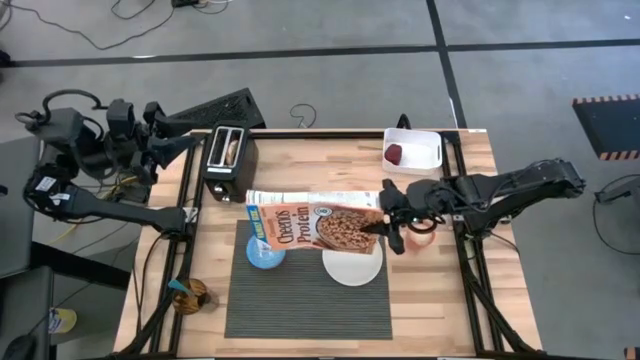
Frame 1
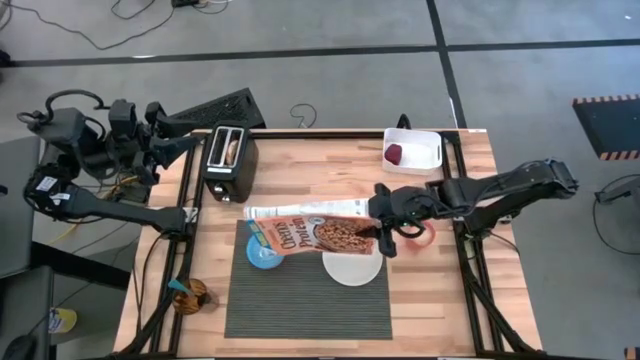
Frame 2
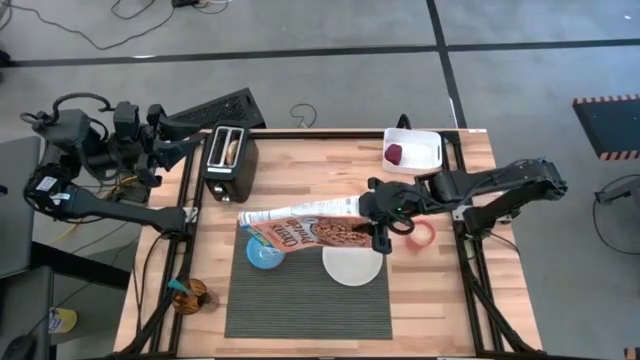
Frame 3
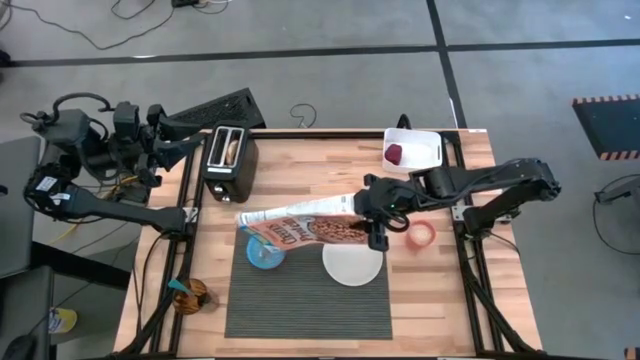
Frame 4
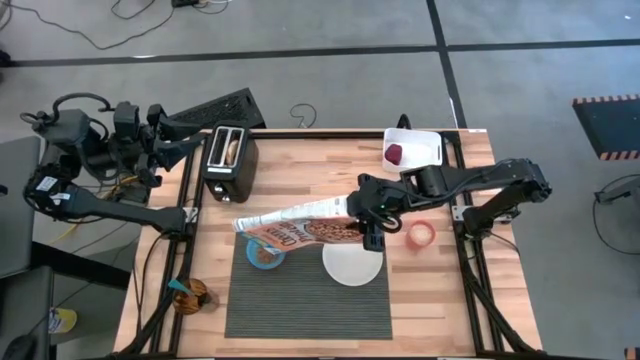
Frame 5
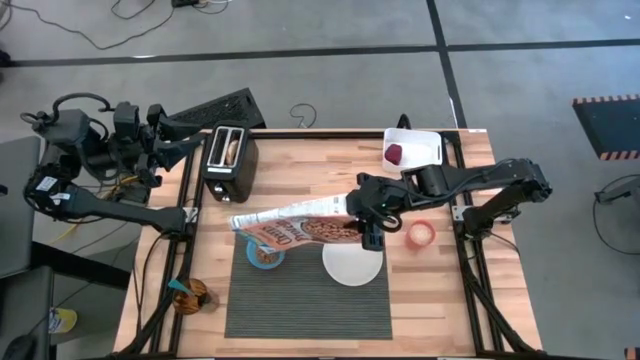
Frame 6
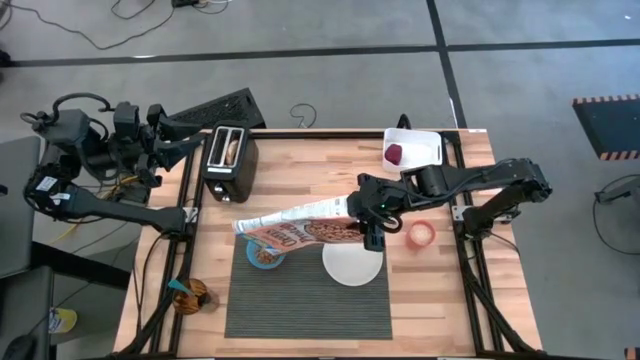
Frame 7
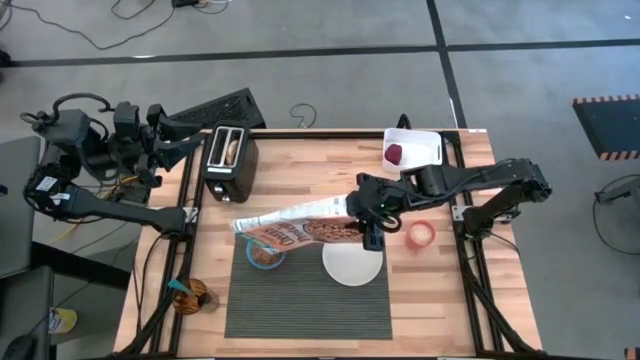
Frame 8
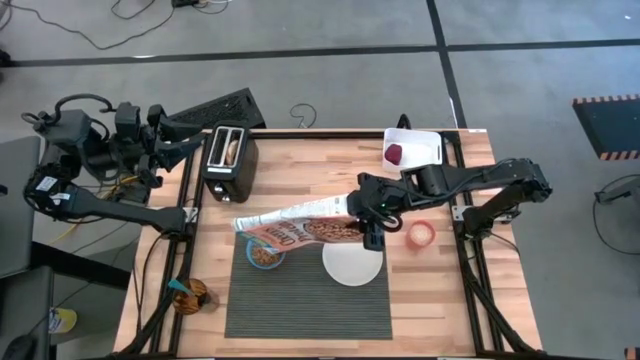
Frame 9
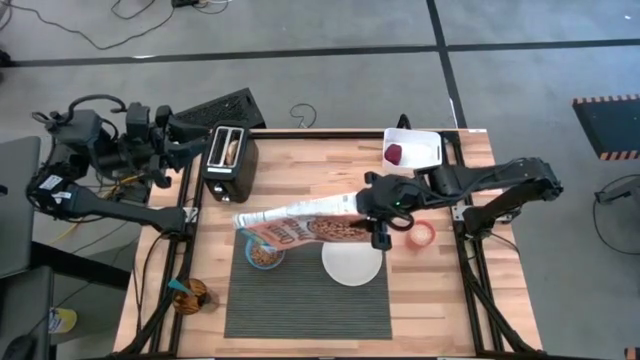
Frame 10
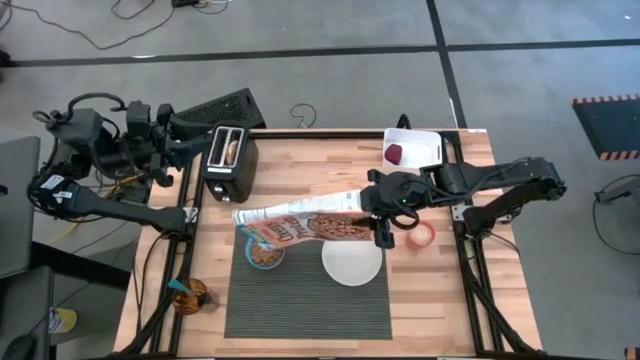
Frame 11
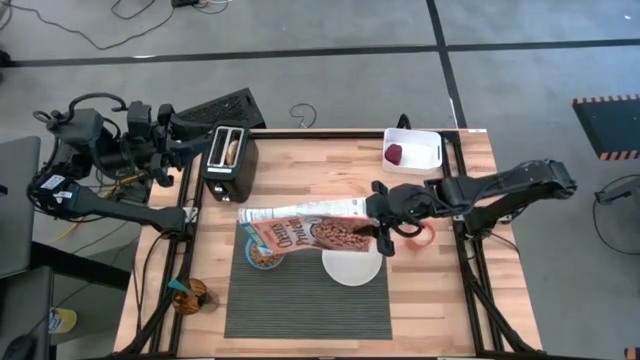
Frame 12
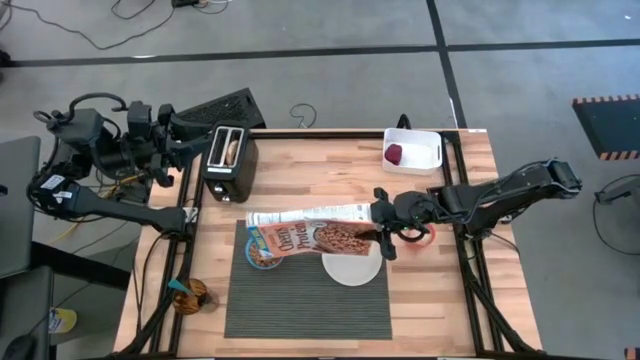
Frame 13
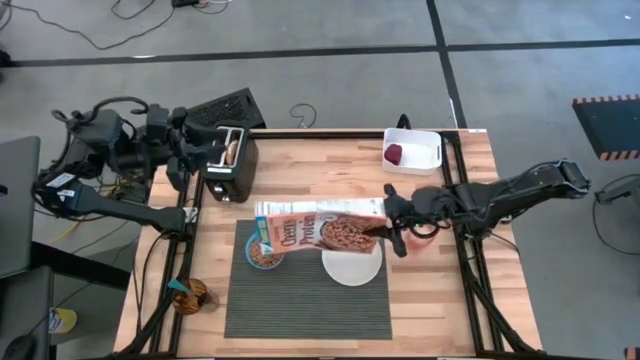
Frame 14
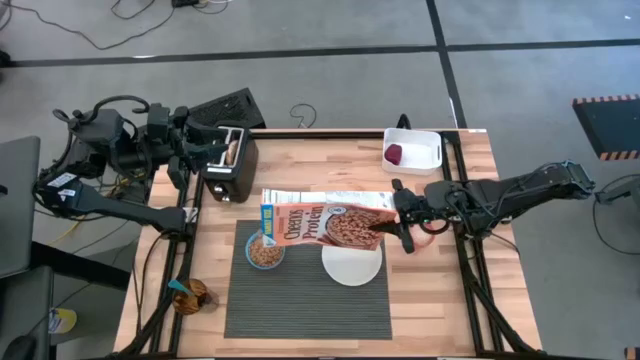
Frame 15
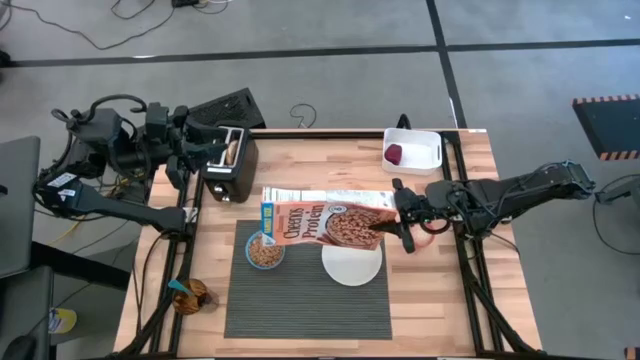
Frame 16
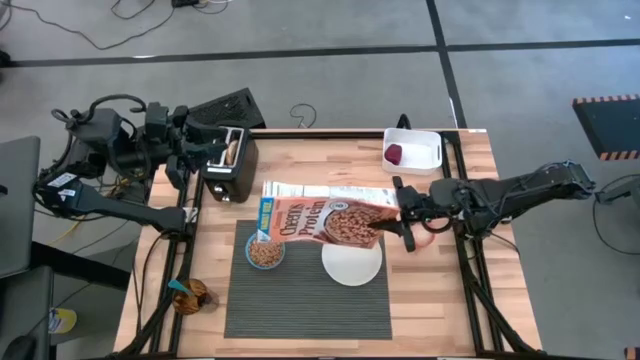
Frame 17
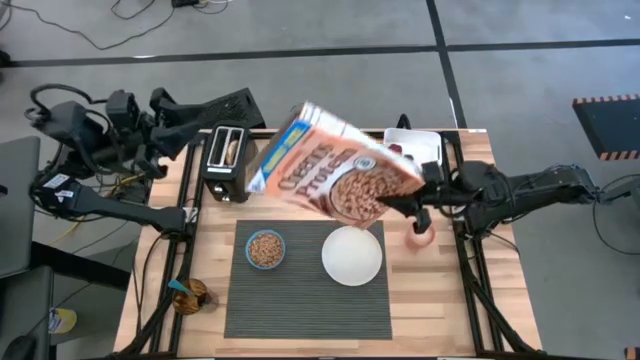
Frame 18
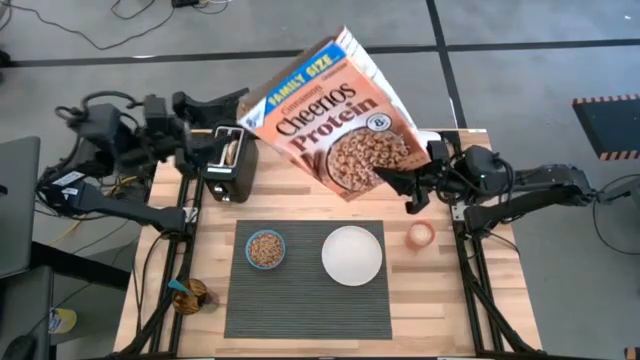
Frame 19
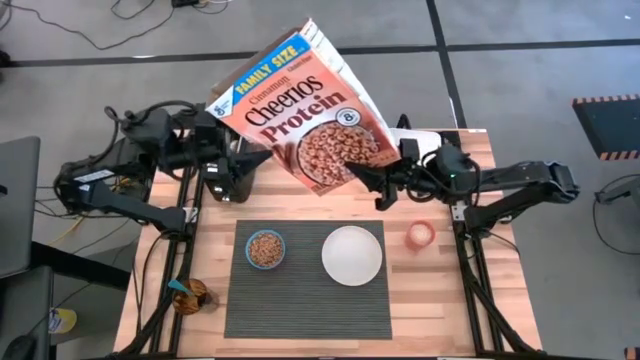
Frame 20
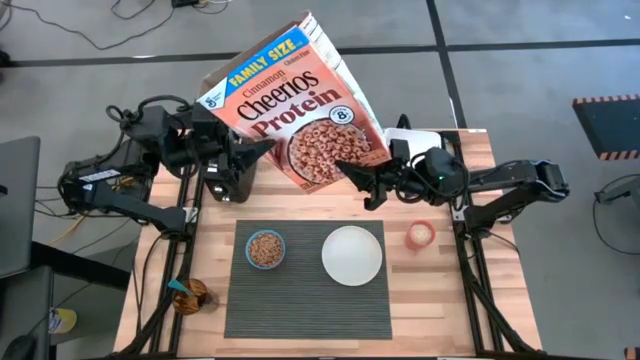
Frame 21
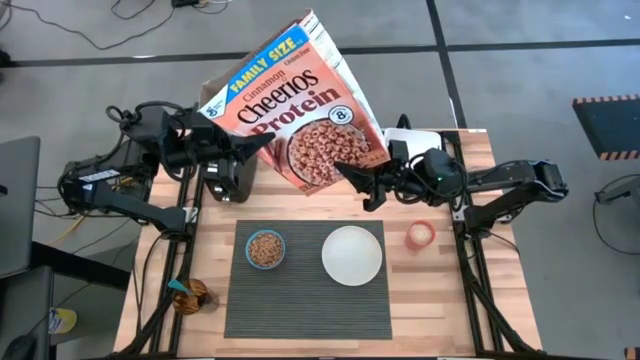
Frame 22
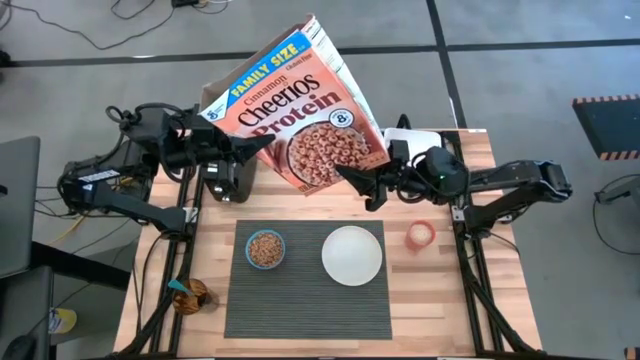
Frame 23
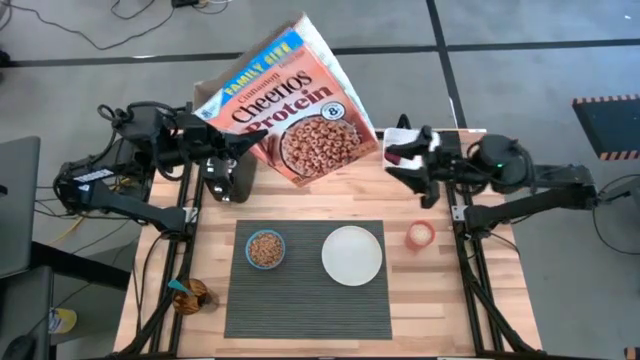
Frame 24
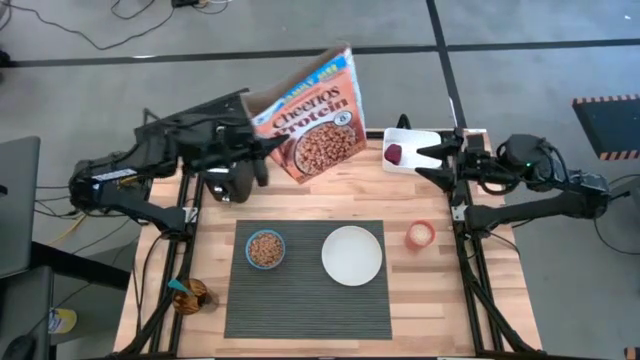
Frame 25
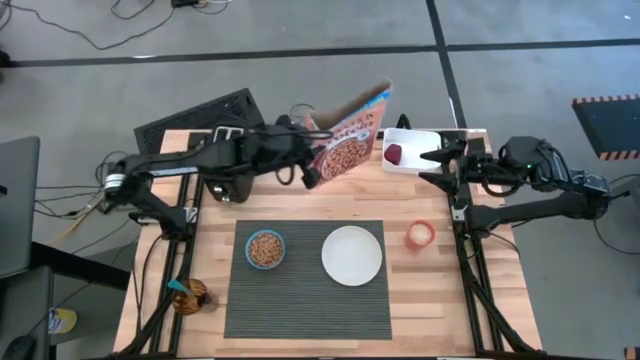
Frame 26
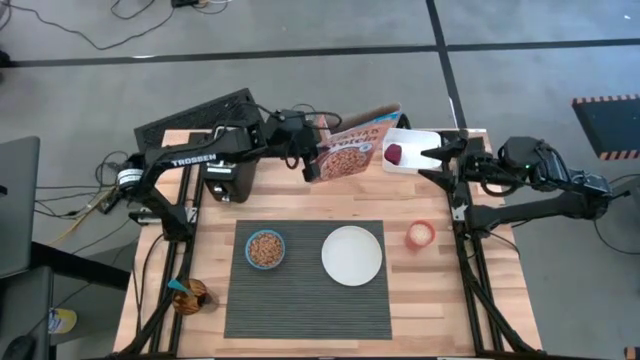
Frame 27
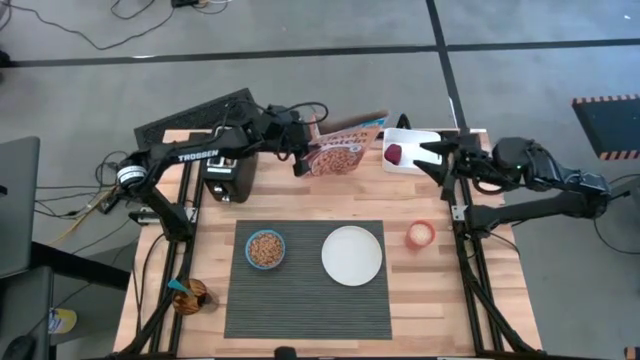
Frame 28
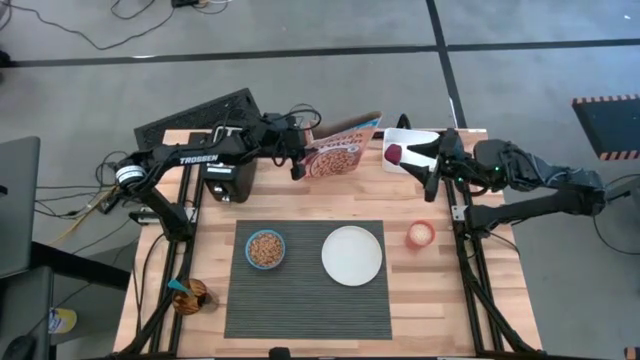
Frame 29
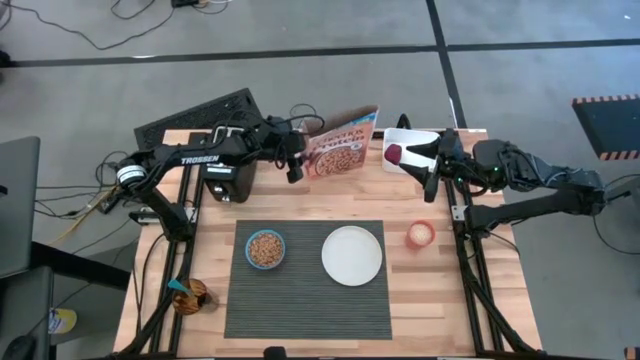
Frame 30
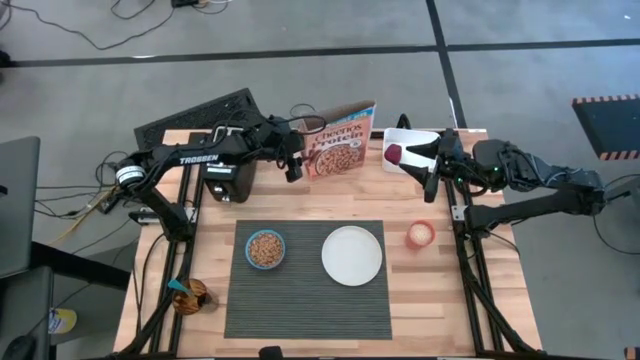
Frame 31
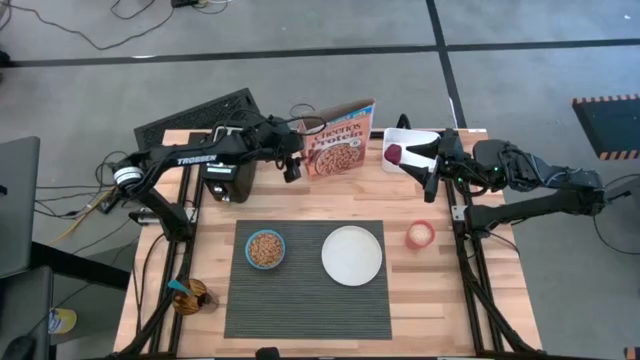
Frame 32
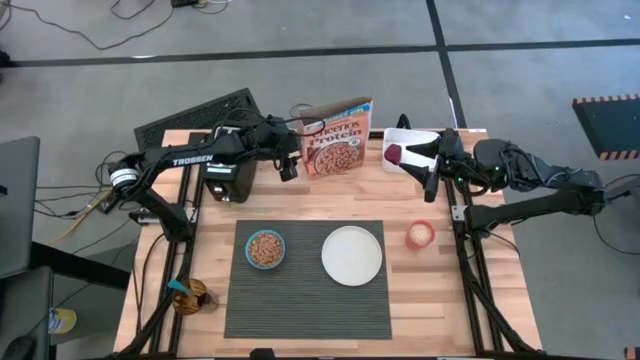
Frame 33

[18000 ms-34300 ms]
Task: Arrange a breakfast setting
Pour the cereal into the blue bowl

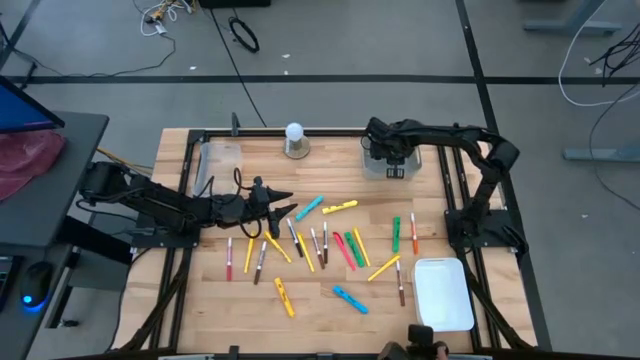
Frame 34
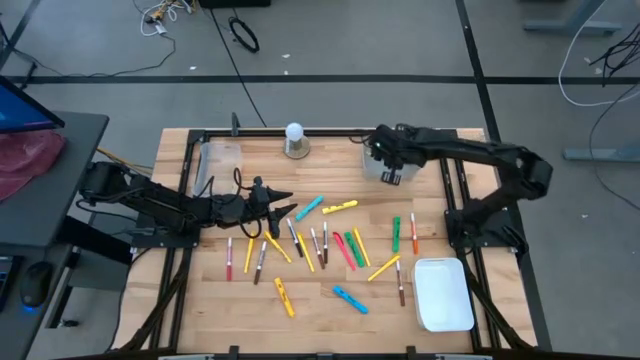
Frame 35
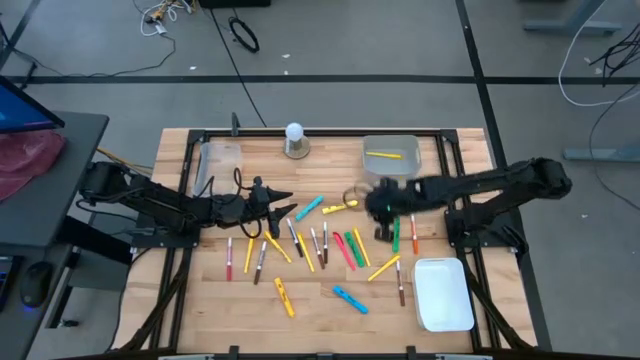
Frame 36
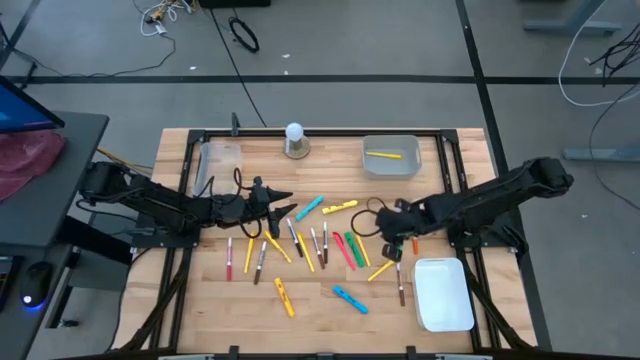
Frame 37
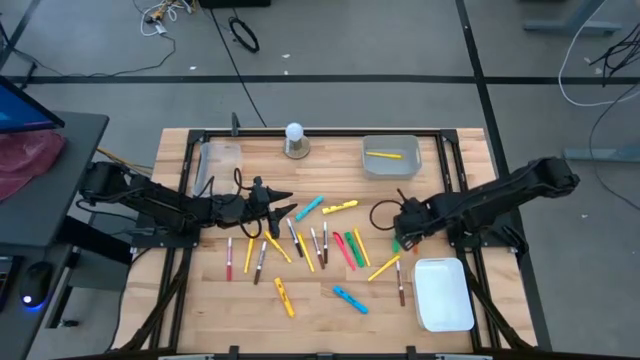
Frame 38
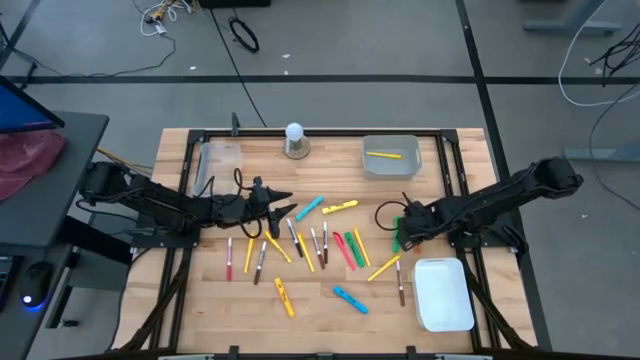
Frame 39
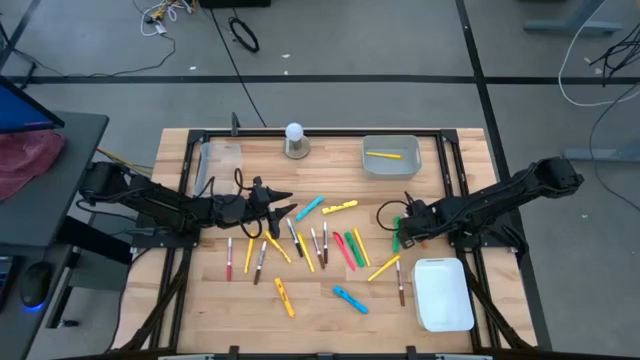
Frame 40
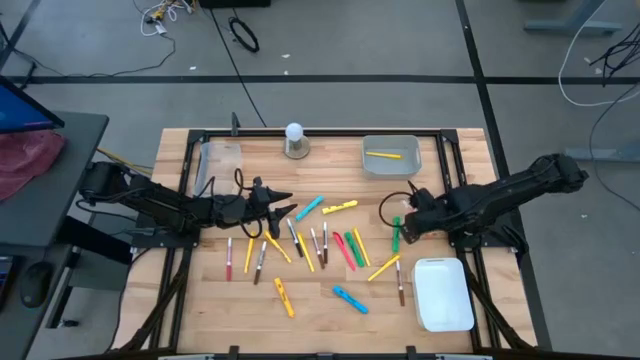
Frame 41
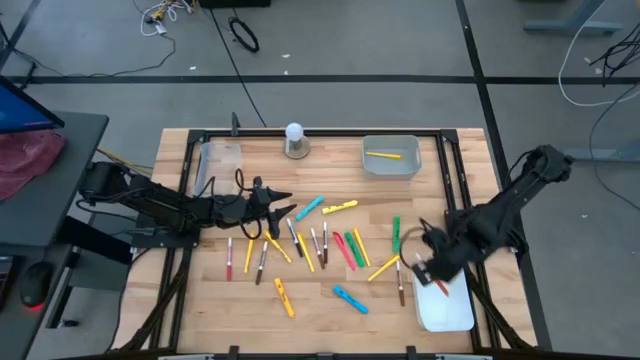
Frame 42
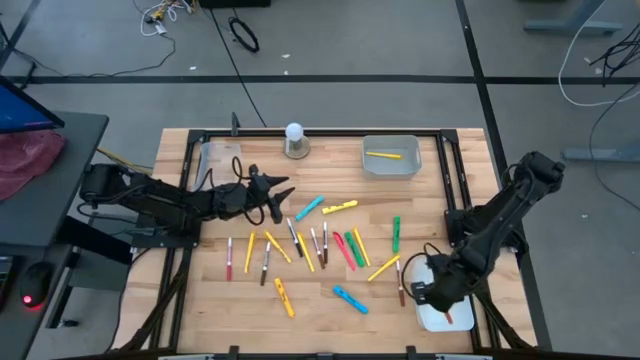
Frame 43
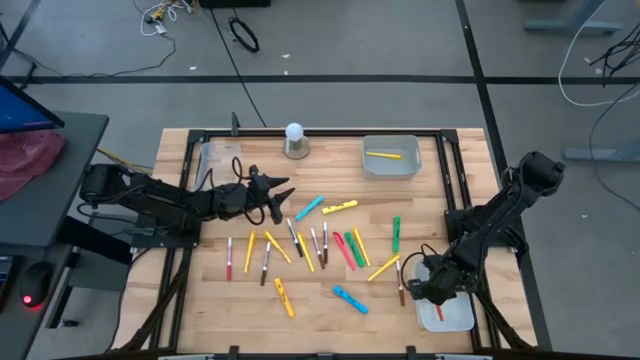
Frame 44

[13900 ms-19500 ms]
Task: Pick & Place Markers
Put the orange marker into the white bin
